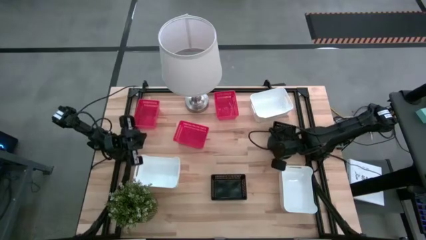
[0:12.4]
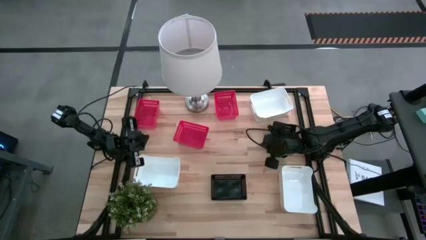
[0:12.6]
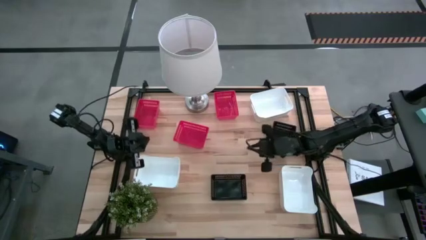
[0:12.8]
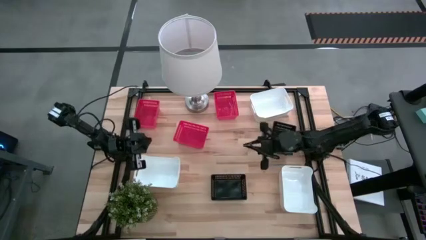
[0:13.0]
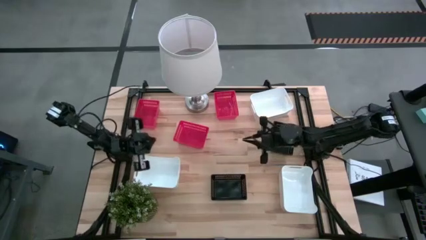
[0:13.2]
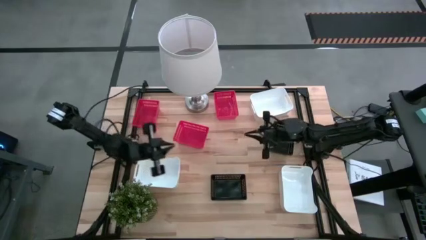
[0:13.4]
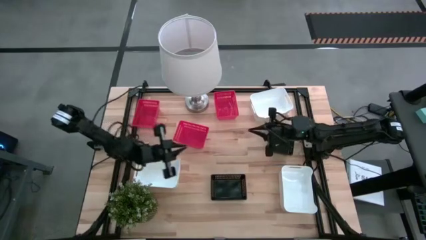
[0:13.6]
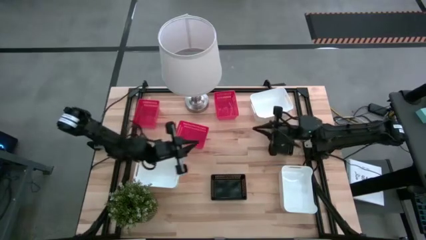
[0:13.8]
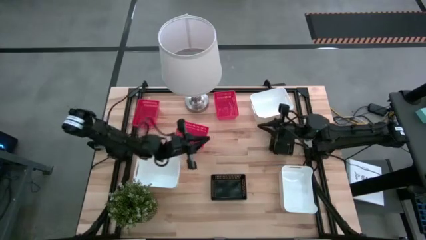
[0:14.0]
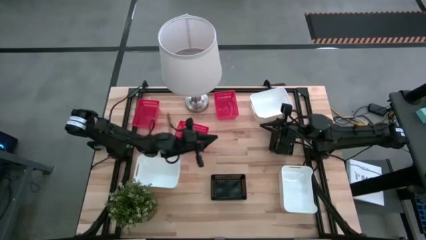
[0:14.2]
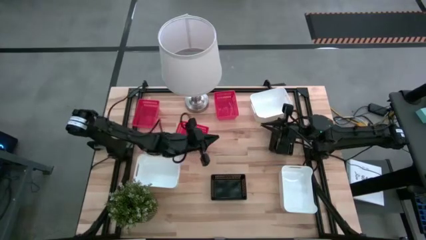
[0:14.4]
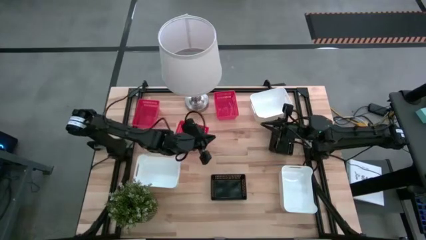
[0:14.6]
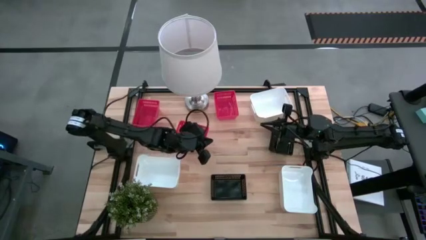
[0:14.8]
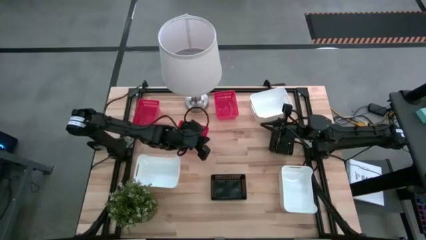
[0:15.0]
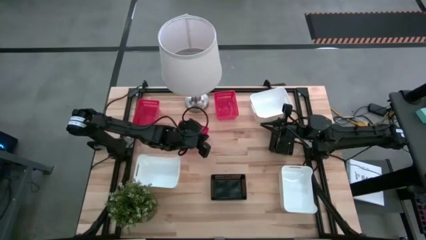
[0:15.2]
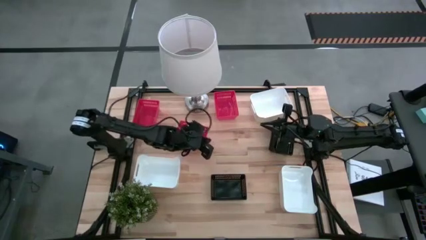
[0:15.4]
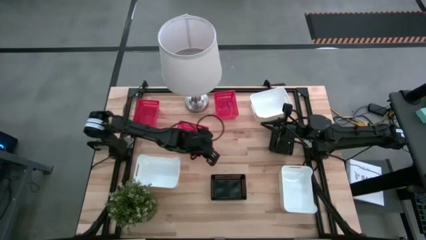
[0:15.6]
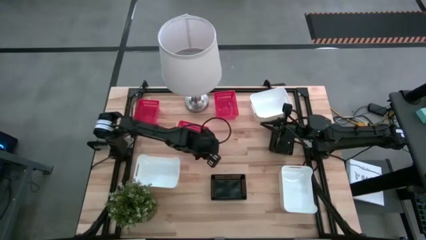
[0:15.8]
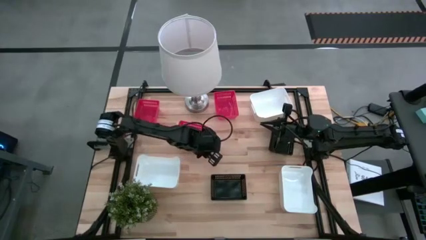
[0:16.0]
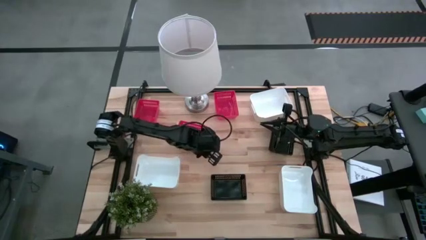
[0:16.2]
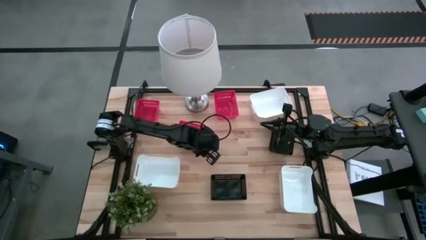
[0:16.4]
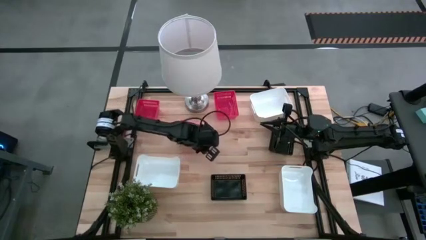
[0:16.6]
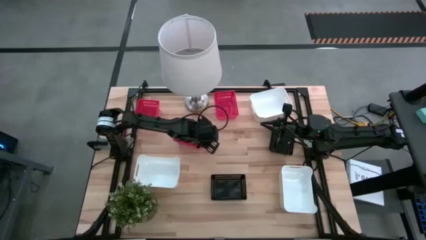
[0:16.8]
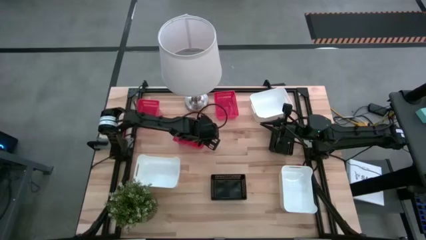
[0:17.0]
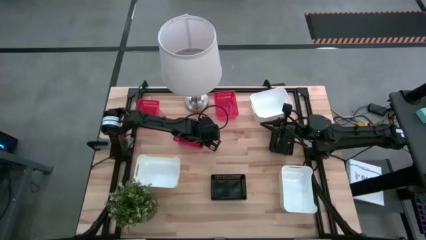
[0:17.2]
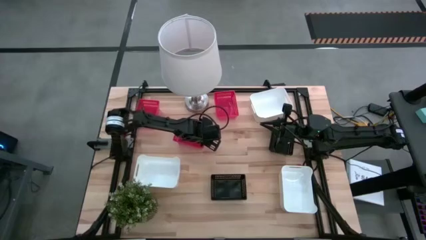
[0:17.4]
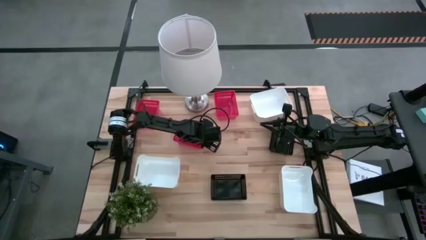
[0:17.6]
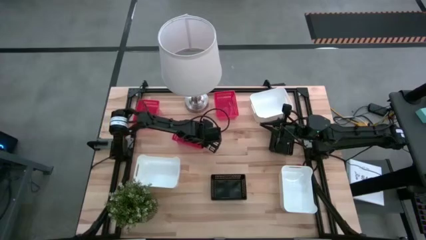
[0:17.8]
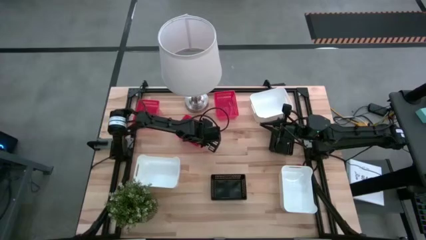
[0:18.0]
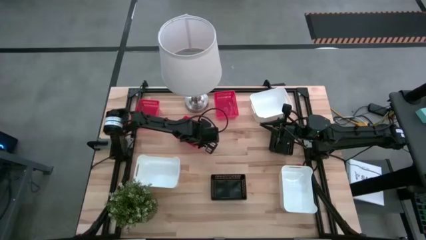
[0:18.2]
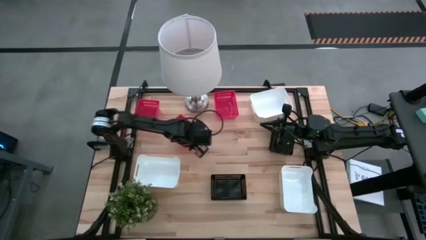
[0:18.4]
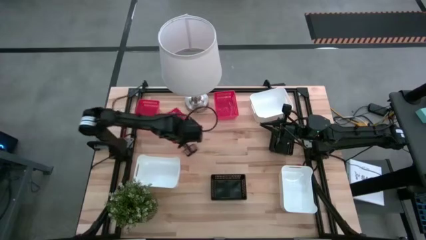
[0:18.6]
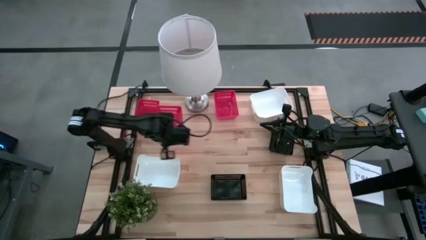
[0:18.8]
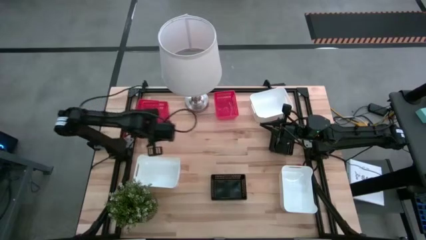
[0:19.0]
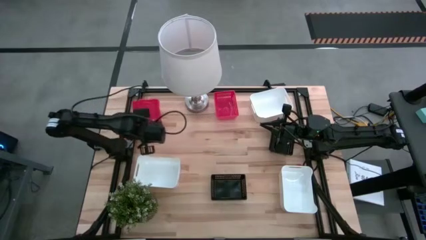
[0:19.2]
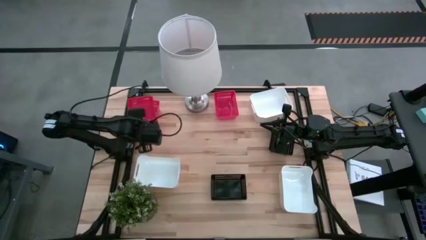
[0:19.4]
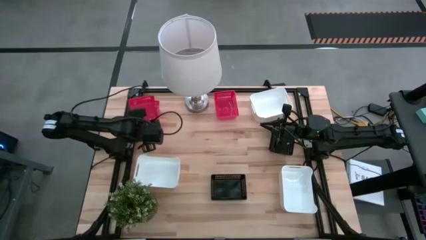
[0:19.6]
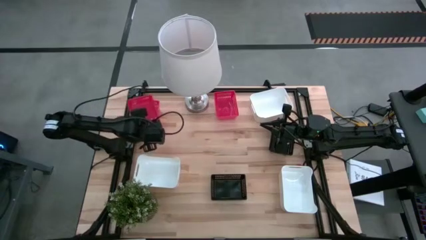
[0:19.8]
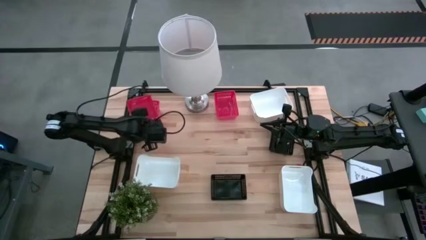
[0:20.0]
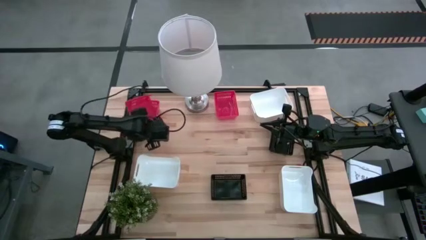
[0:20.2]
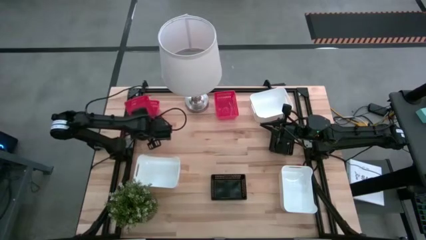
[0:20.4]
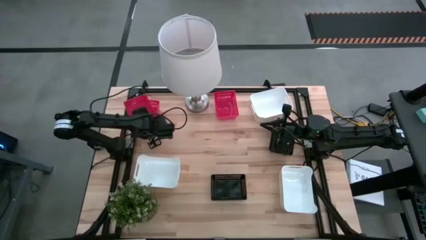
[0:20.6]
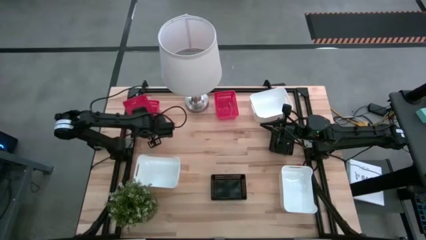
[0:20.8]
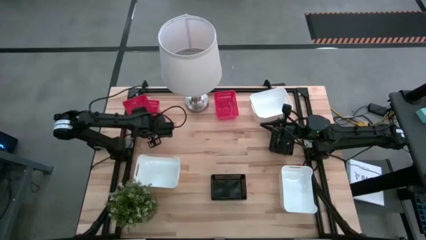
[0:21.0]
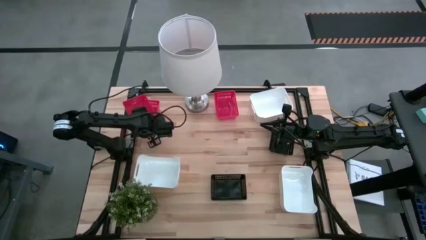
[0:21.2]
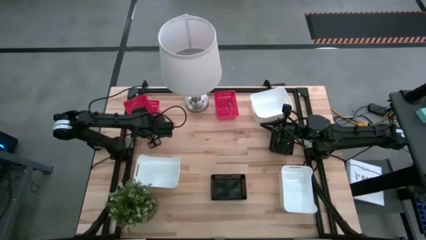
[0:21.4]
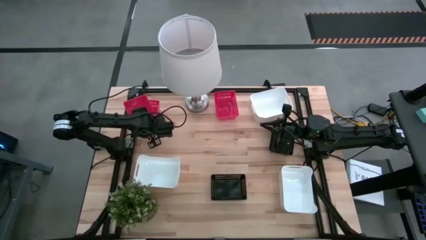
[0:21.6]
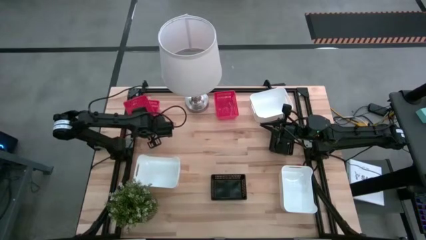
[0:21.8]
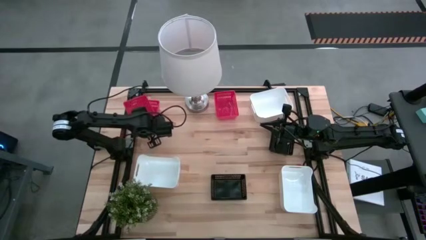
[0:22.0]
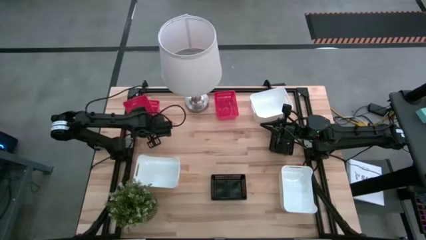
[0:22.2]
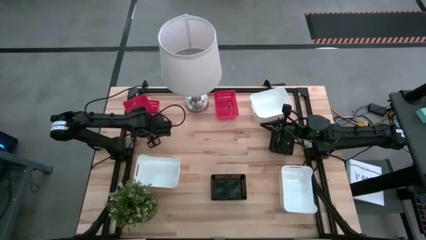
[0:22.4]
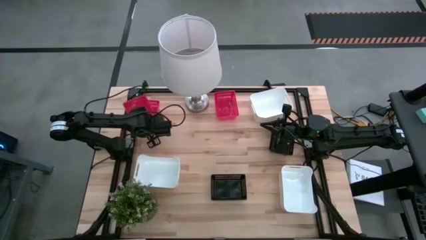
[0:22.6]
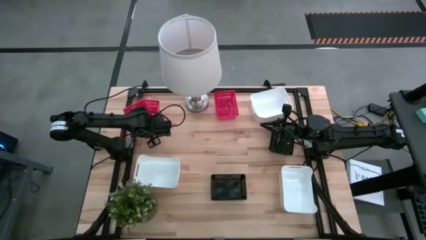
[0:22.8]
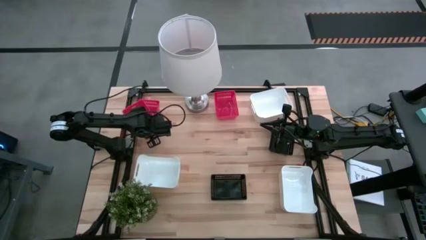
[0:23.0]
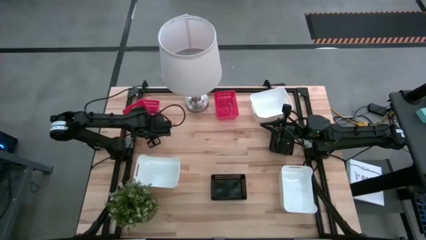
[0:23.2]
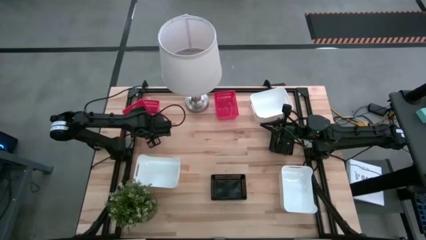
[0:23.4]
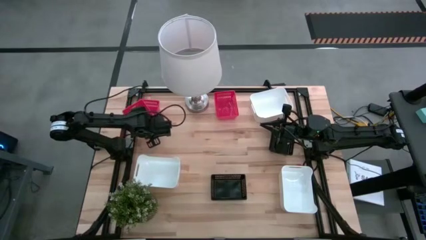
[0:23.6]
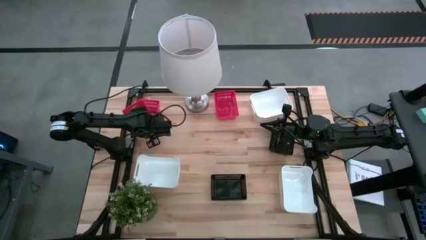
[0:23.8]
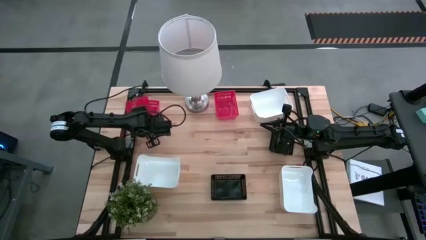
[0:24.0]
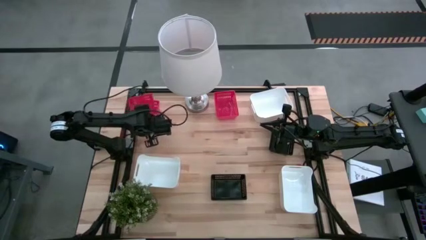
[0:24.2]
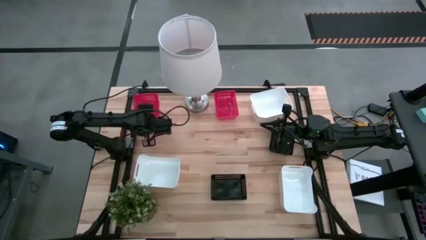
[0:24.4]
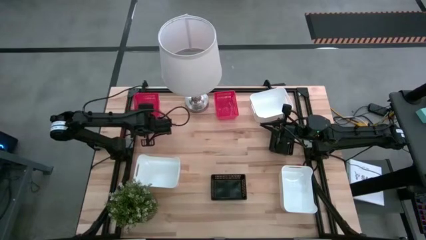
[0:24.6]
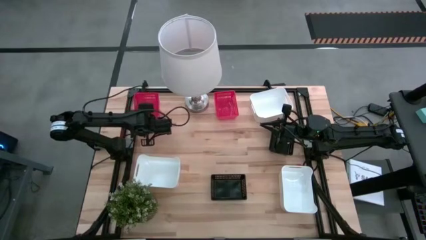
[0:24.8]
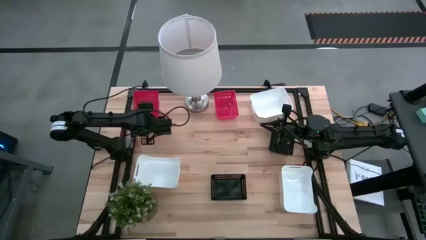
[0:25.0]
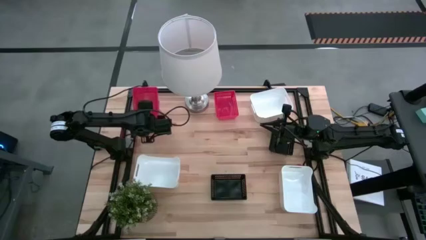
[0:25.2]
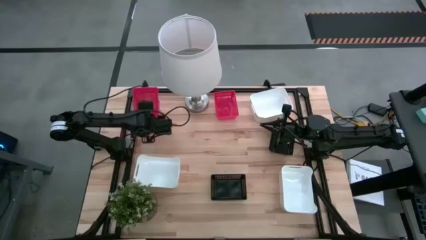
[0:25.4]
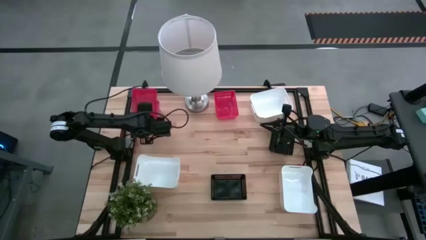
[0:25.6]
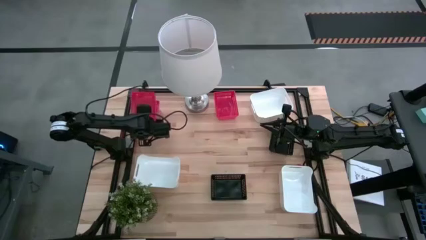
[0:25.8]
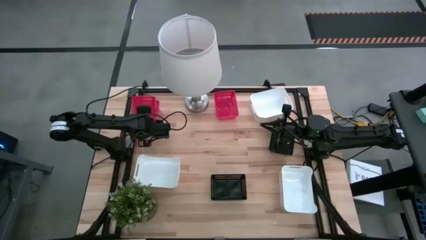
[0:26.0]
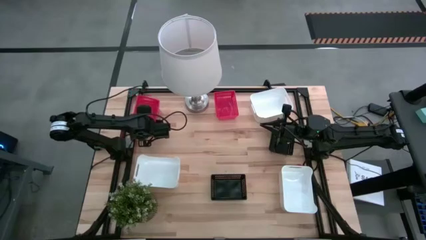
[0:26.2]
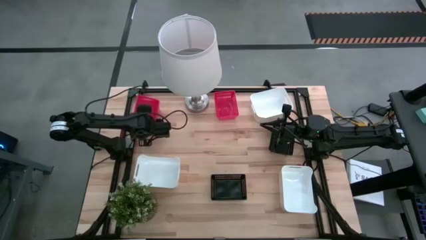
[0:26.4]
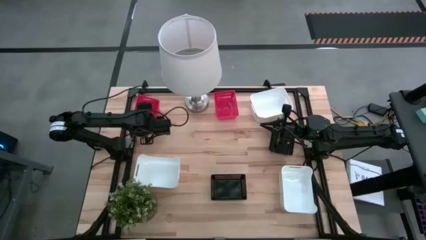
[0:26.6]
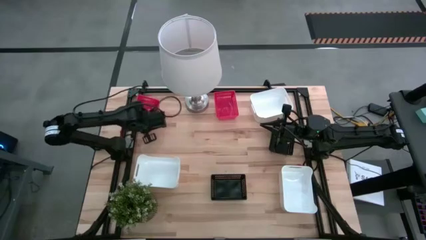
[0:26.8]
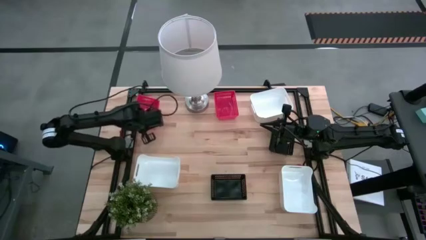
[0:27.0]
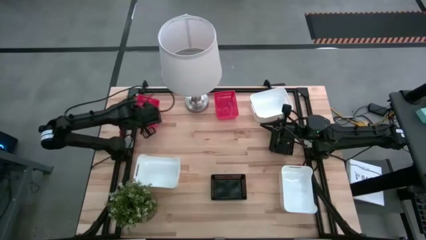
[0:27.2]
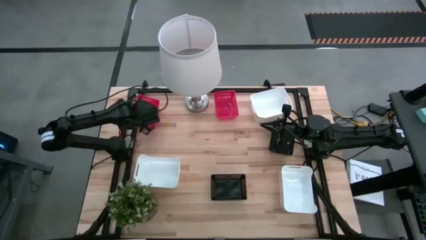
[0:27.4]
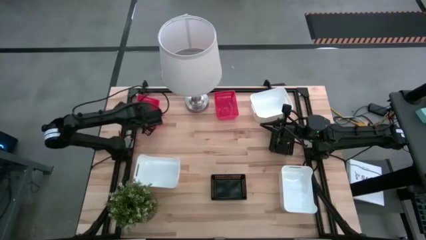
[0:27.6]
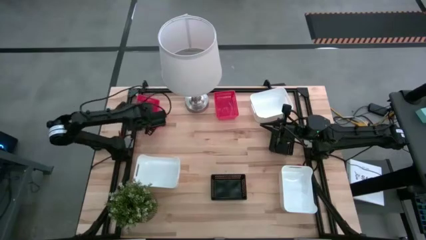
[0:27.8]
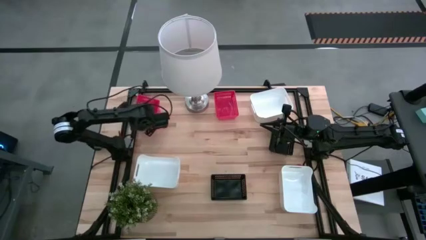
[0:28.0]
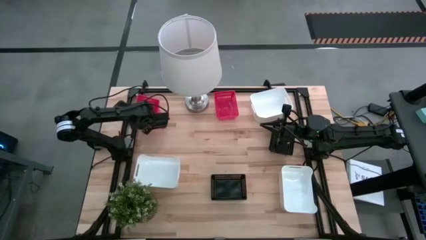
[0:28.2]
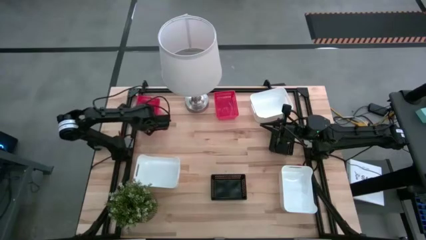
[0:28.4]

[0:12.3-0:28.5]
Stack the bottom red bin on top of the left red bin
